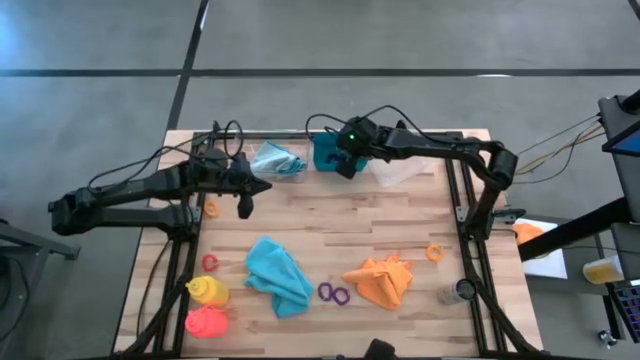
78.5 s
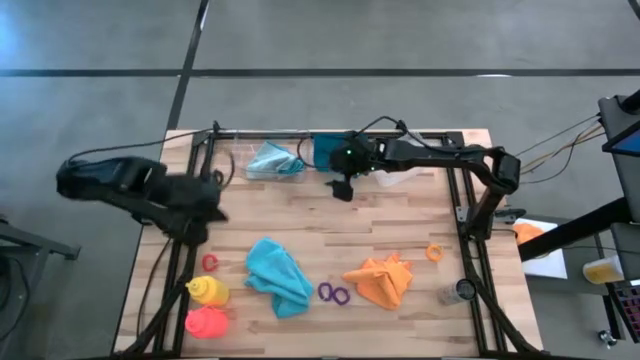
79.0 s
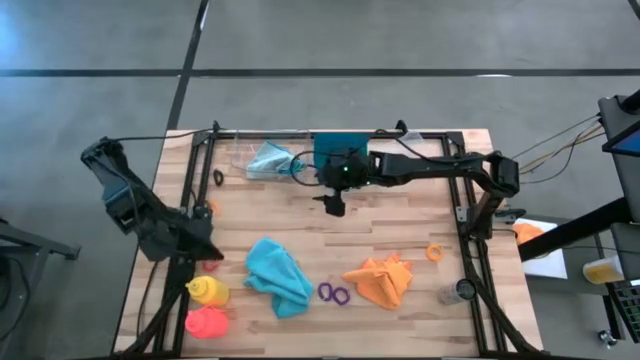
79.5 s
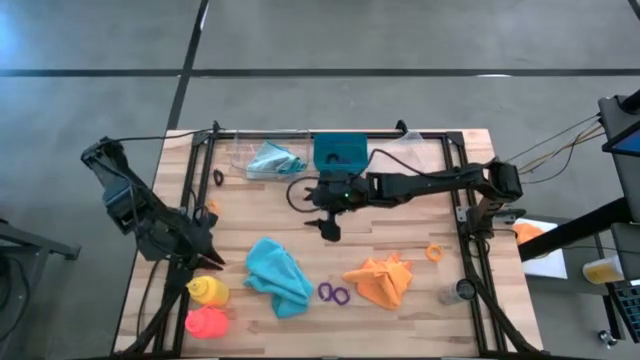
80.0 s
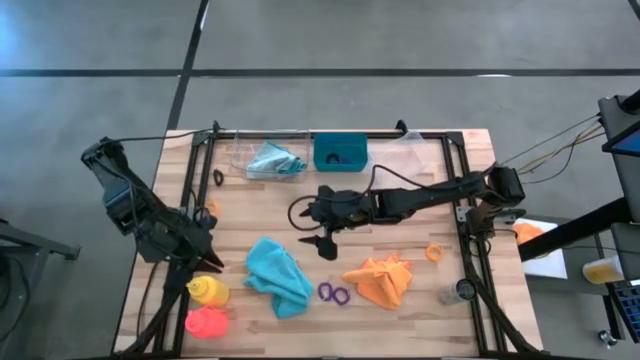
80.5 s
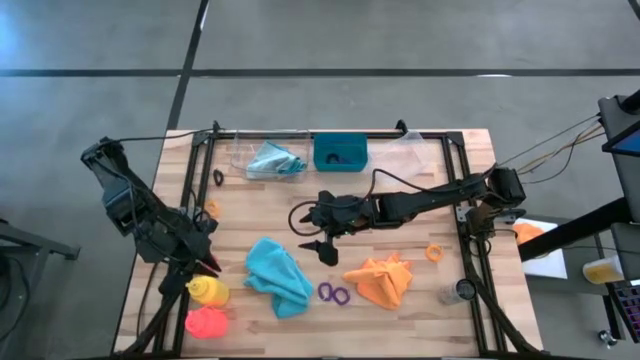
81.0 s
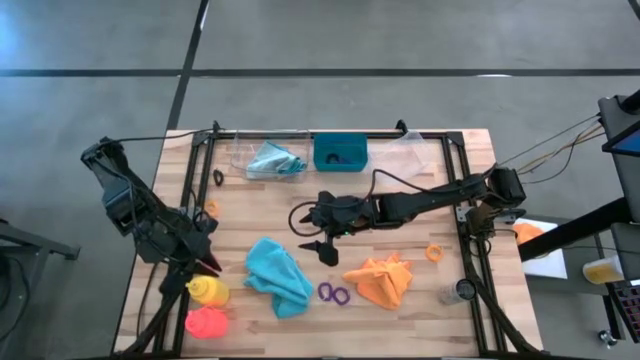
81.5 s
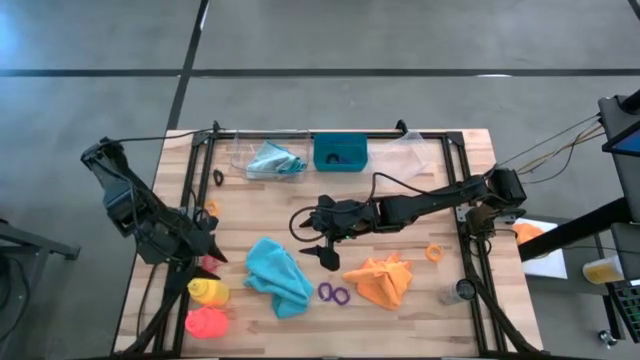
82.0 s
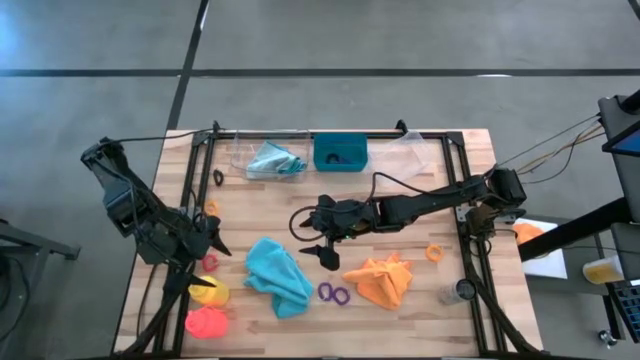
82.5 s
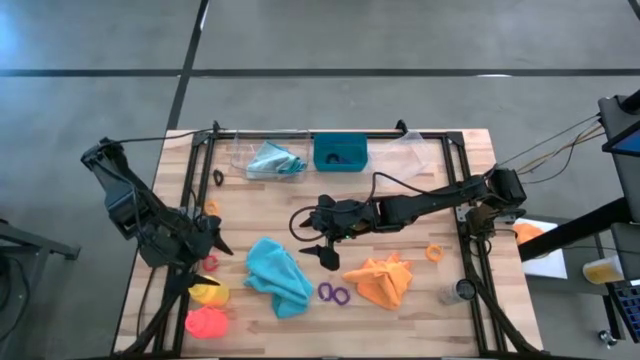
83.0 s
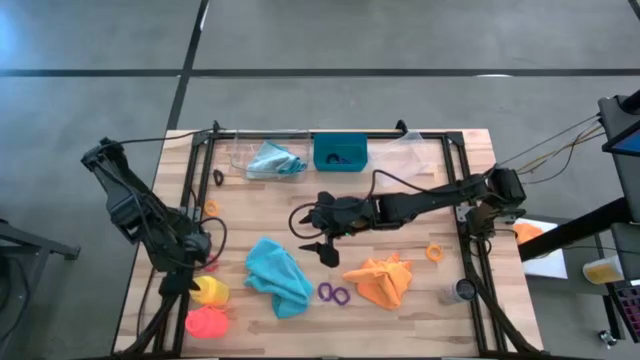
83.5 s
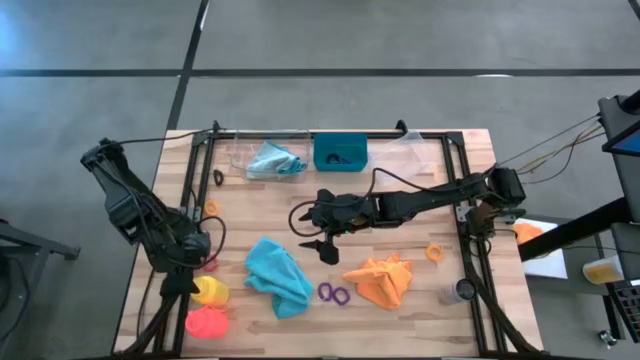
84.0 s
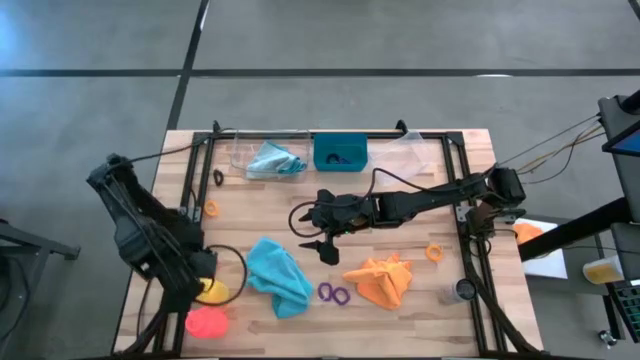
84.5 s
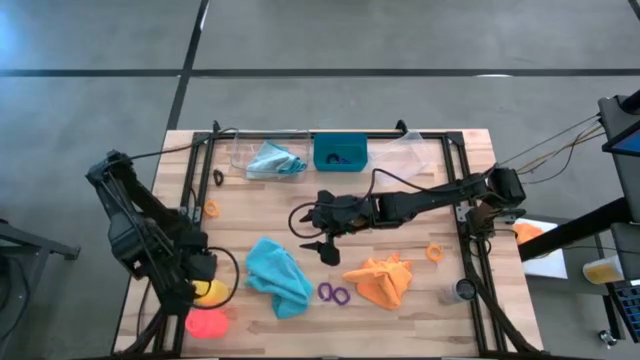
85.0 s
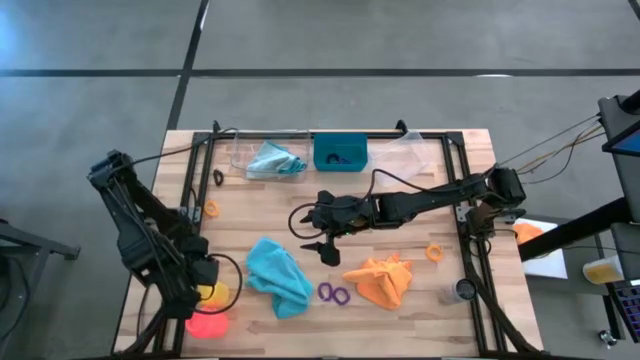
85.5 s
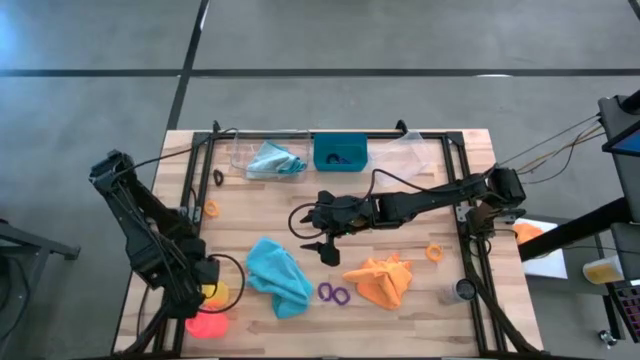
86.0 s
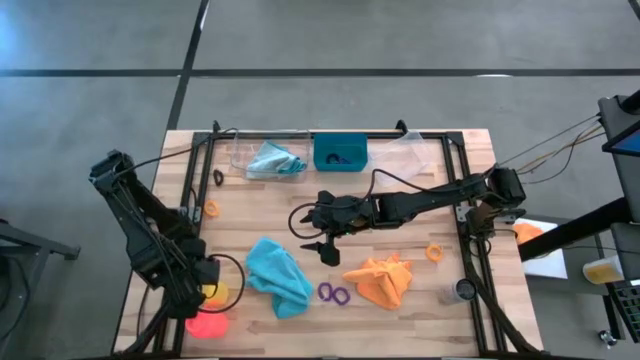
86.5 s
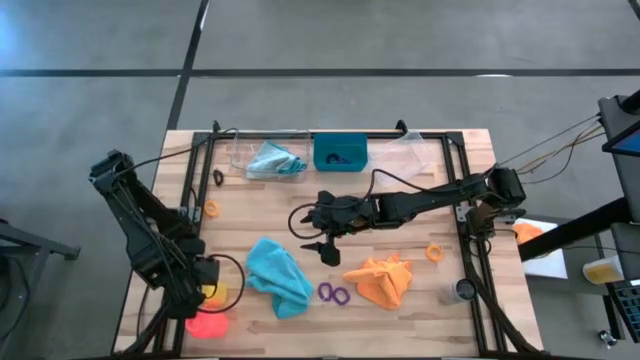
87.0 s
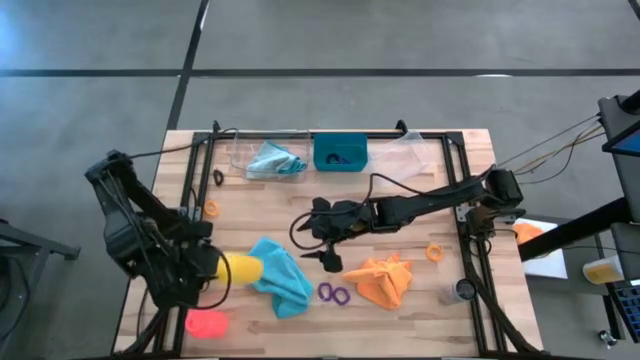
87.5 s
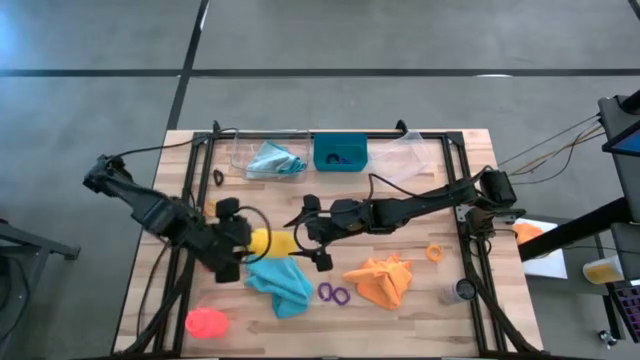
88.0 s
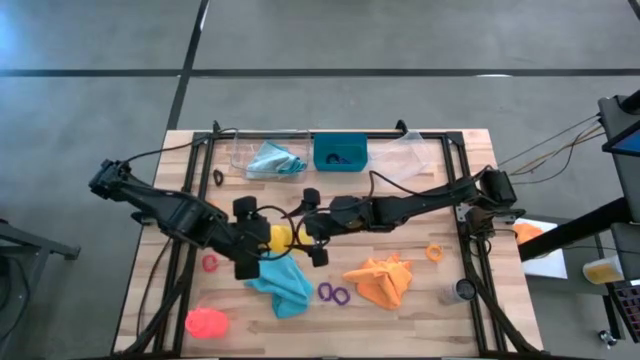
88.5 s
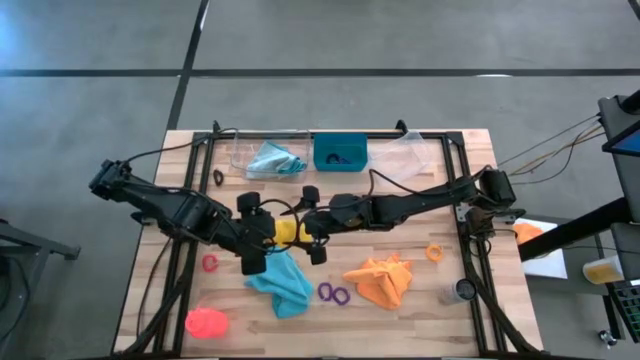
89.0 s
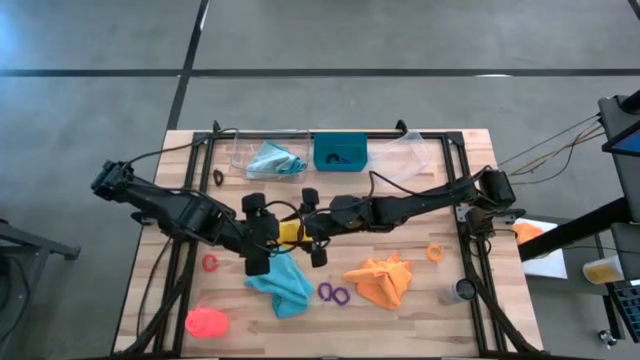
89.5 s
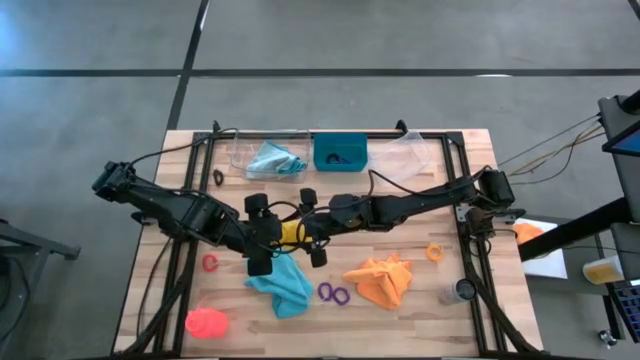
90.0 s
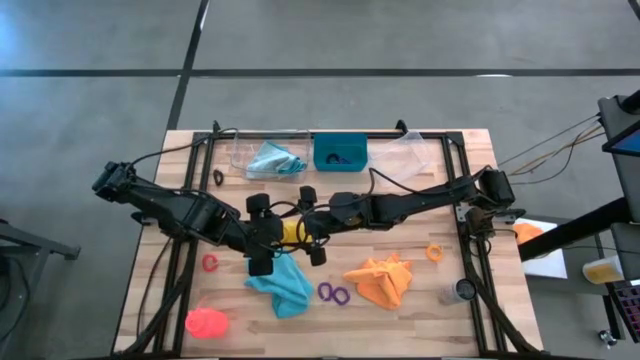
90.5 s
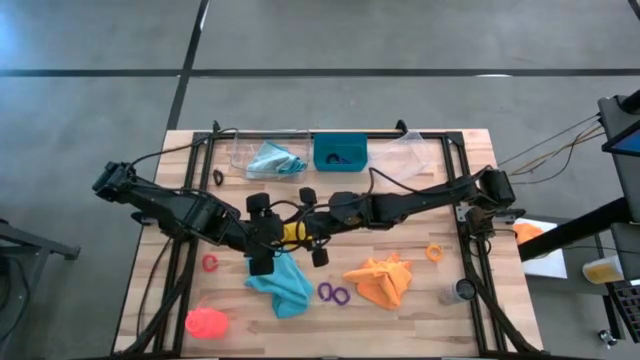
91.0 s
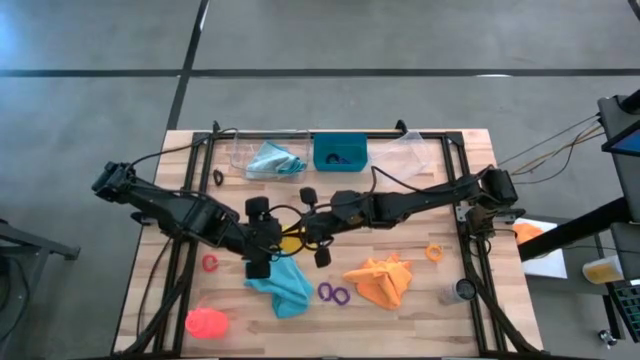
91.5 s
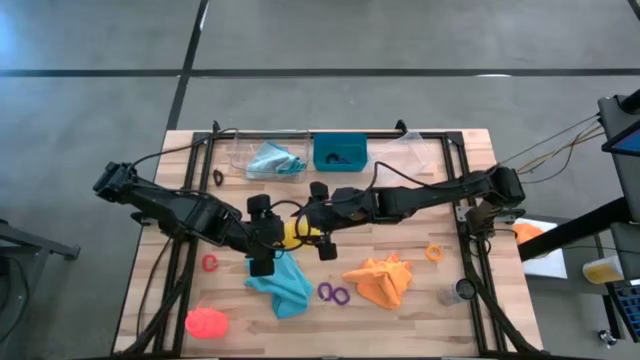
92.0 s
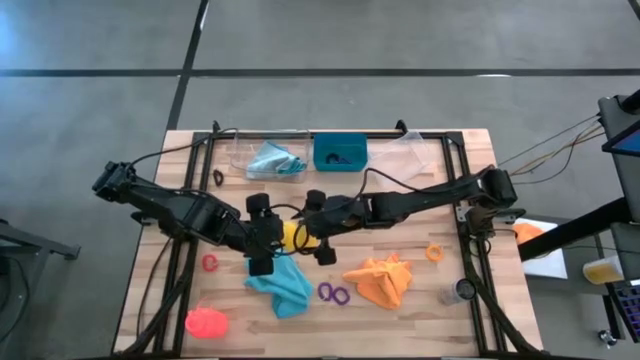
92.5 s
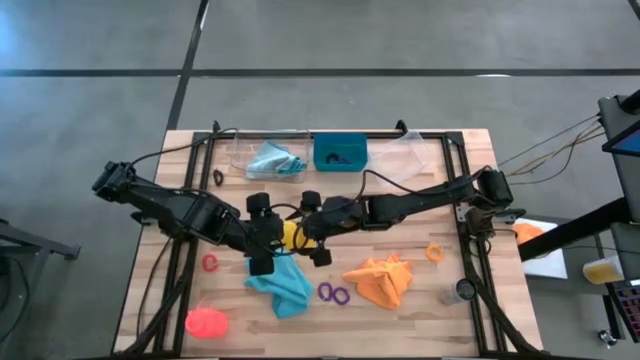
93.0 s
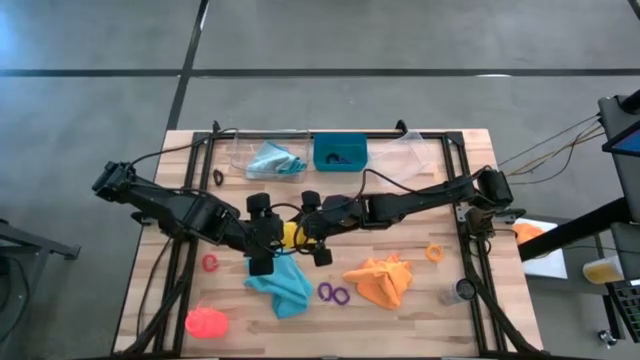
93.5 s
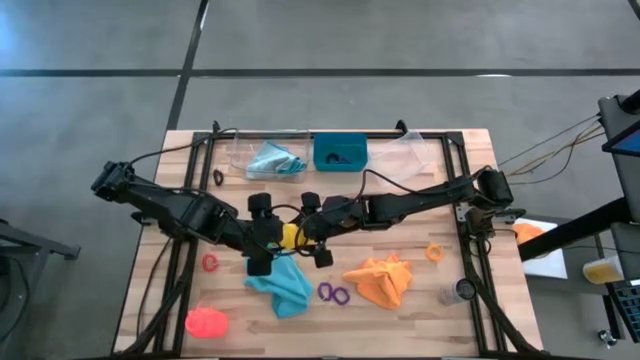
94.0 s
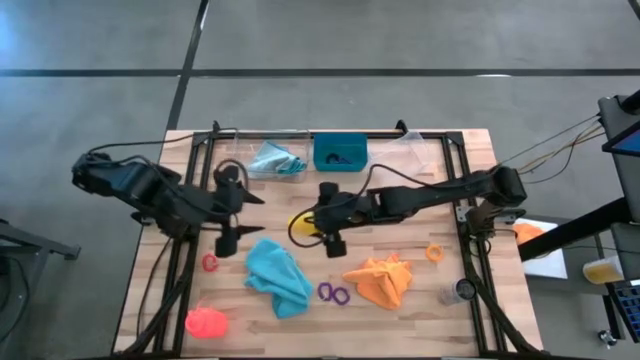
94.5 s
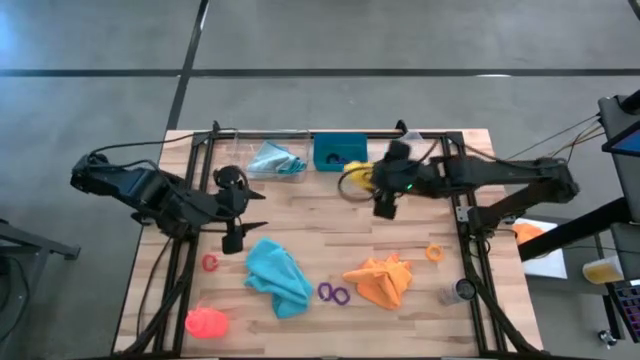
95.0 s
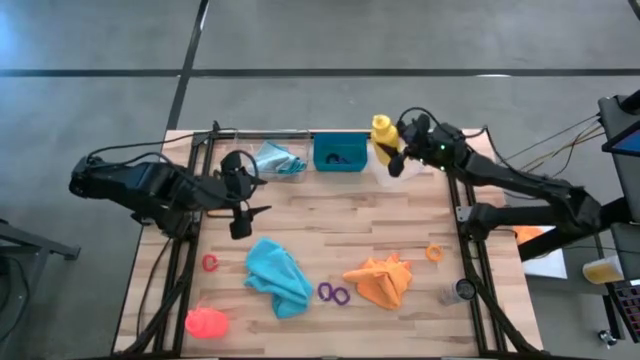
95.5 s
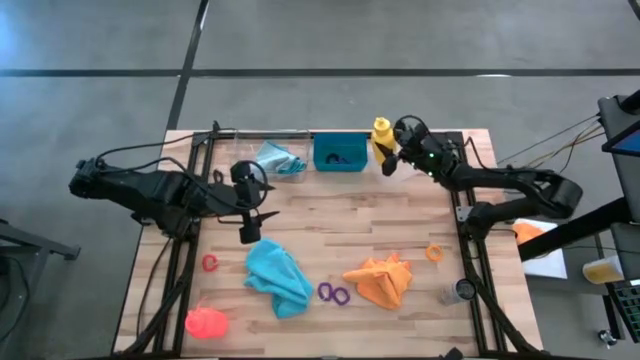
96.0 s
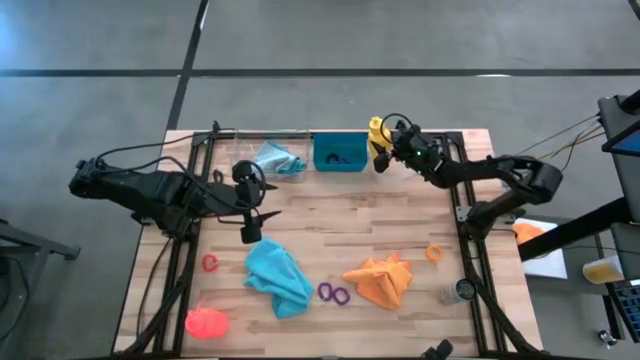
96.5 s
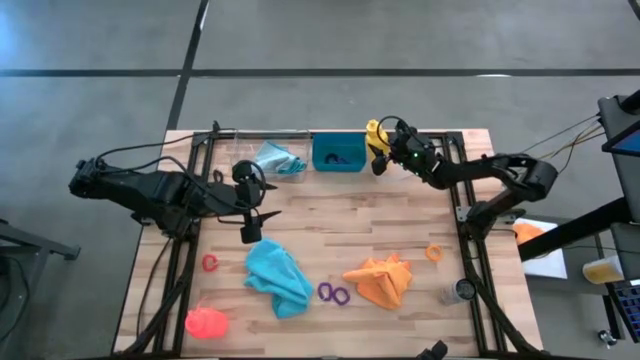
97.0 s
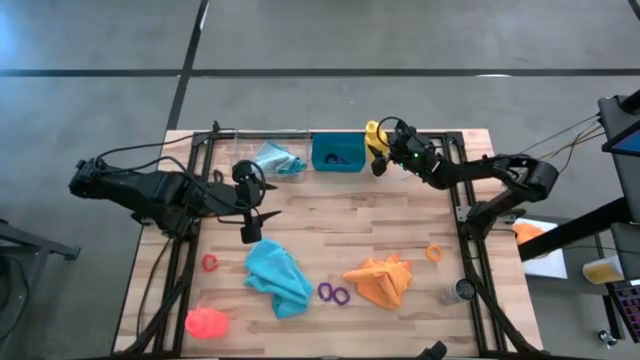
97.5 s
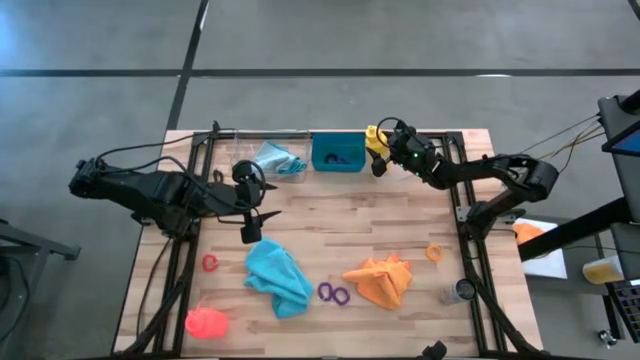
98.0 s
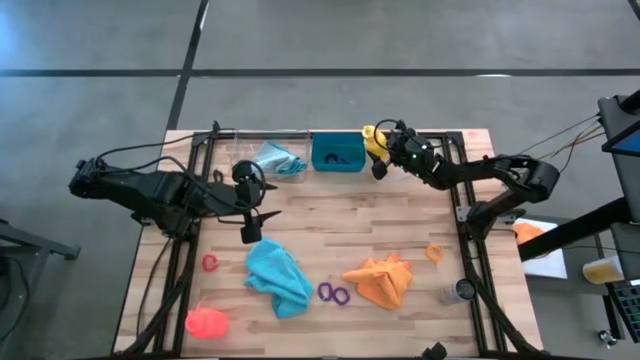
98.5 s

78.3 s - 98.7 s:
Task: Pick & Place Sports Items
Put the yellow water bottle into the white bin
